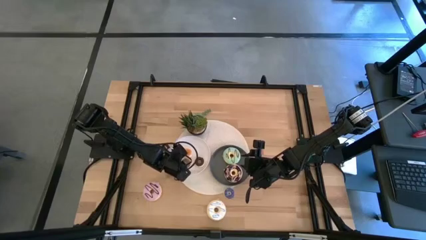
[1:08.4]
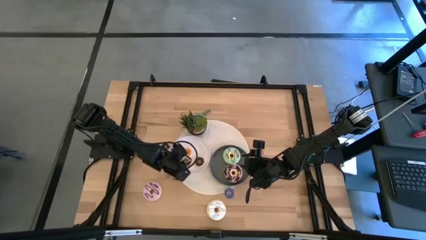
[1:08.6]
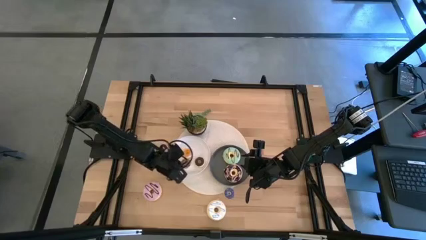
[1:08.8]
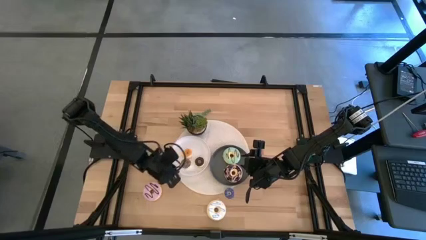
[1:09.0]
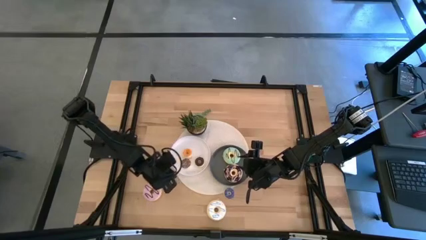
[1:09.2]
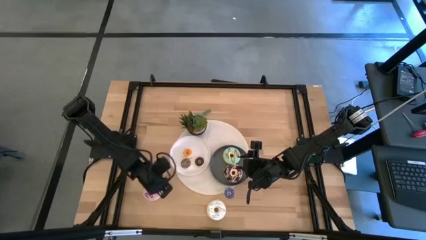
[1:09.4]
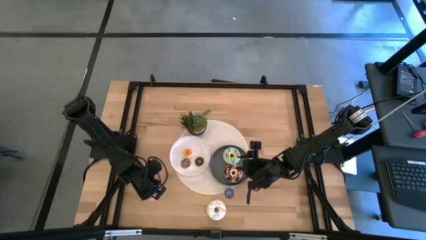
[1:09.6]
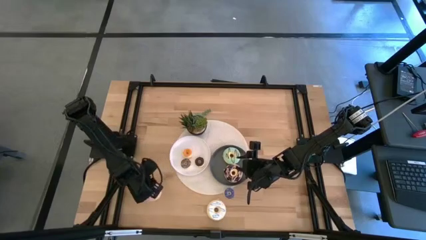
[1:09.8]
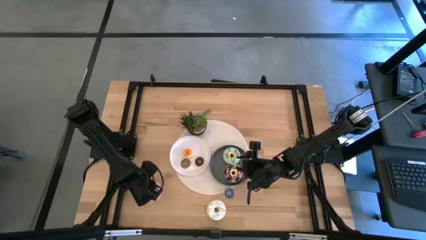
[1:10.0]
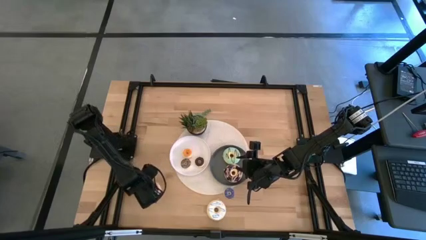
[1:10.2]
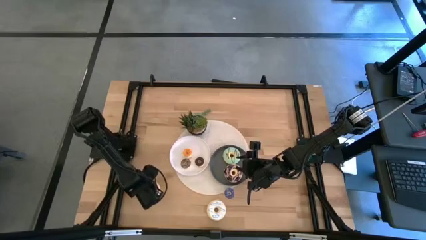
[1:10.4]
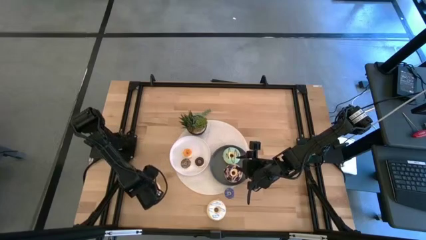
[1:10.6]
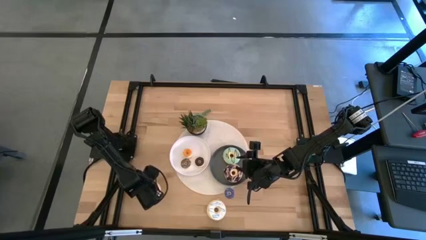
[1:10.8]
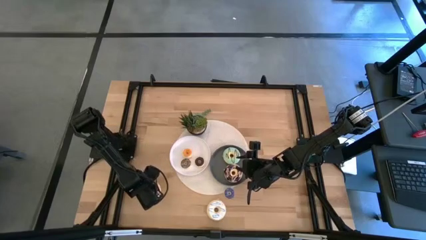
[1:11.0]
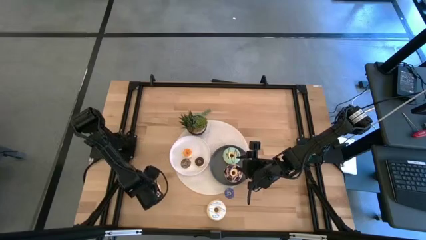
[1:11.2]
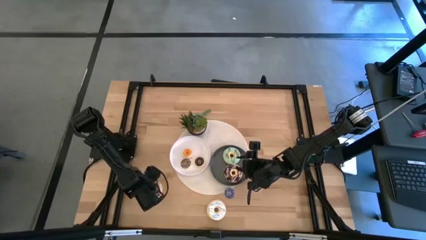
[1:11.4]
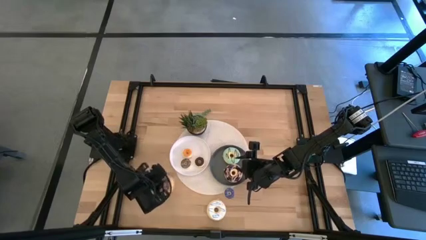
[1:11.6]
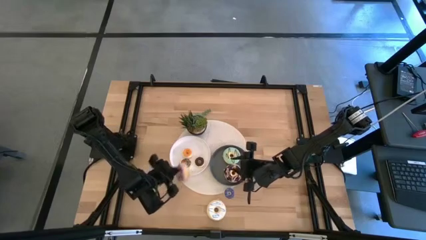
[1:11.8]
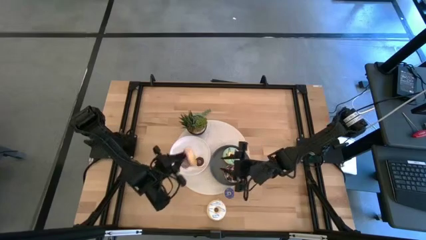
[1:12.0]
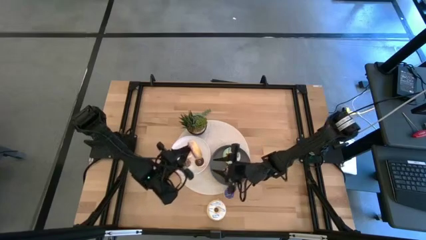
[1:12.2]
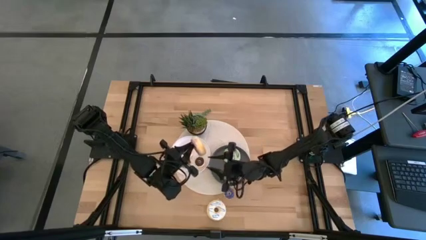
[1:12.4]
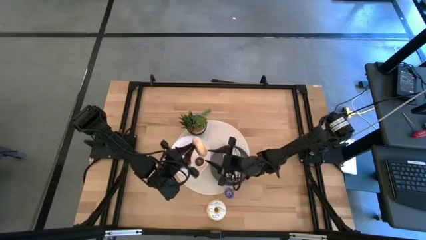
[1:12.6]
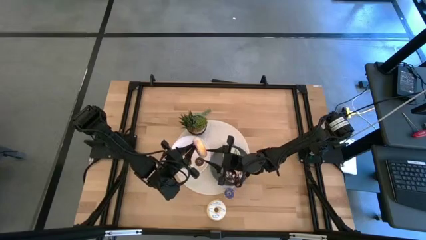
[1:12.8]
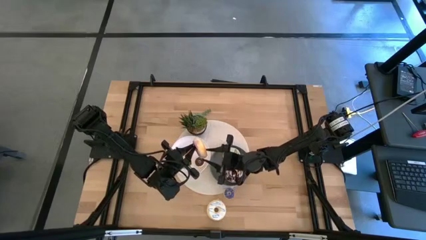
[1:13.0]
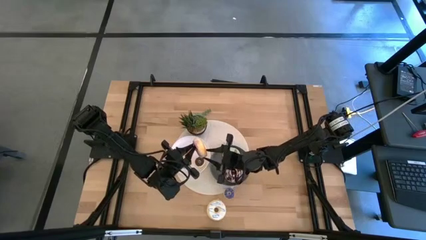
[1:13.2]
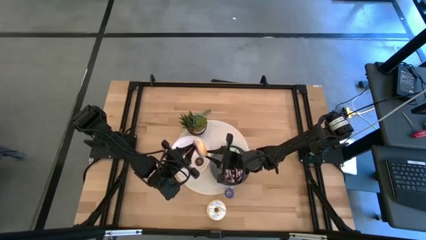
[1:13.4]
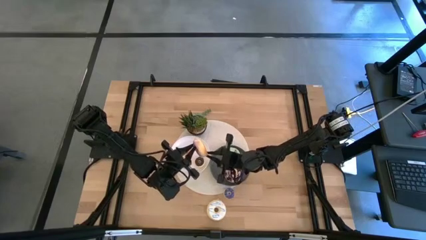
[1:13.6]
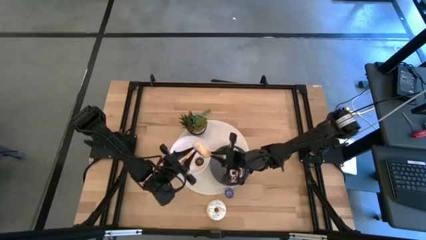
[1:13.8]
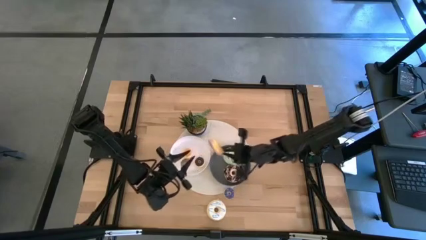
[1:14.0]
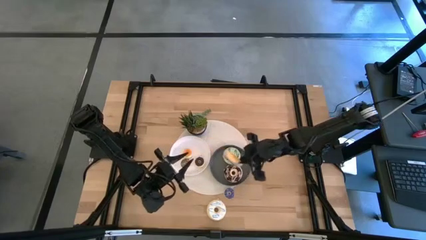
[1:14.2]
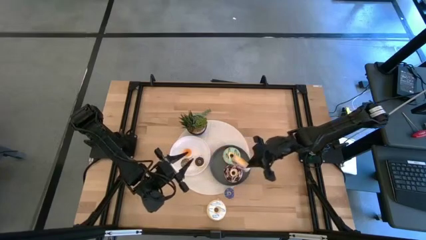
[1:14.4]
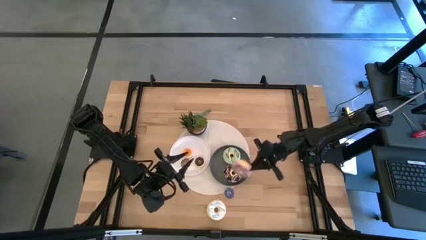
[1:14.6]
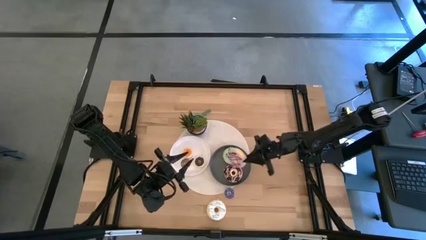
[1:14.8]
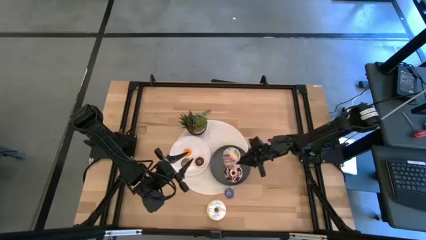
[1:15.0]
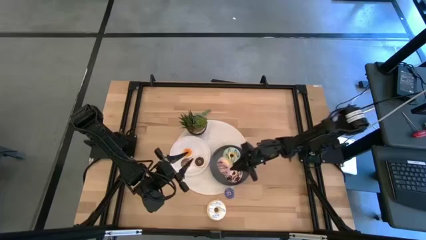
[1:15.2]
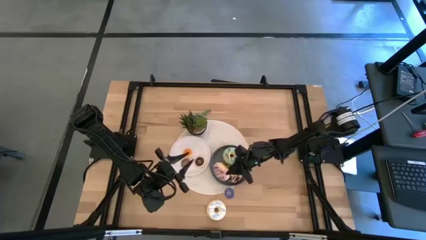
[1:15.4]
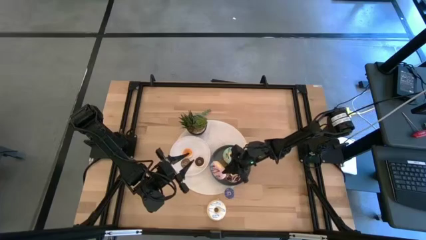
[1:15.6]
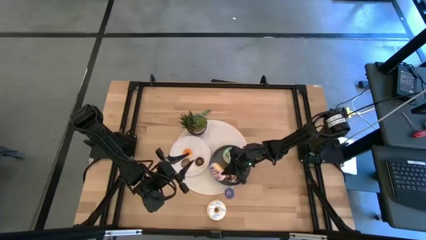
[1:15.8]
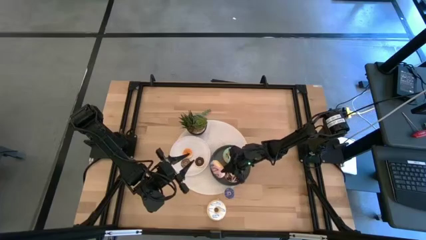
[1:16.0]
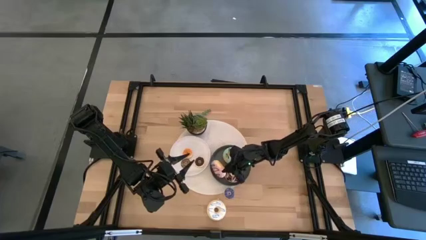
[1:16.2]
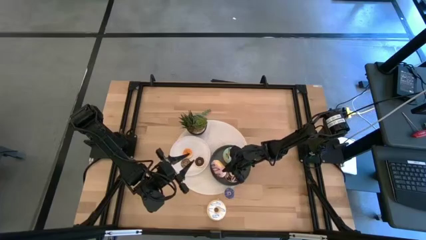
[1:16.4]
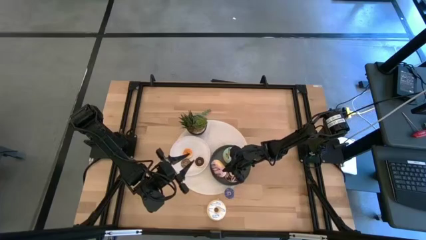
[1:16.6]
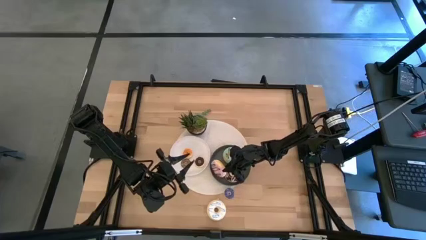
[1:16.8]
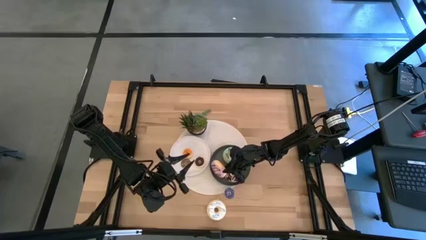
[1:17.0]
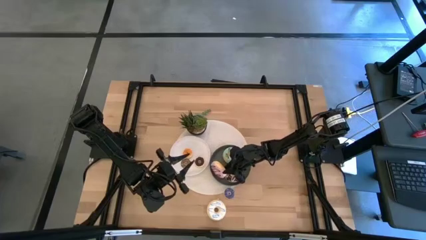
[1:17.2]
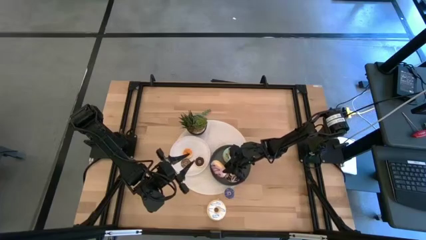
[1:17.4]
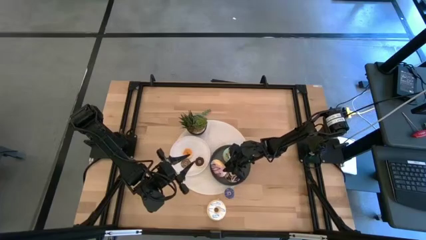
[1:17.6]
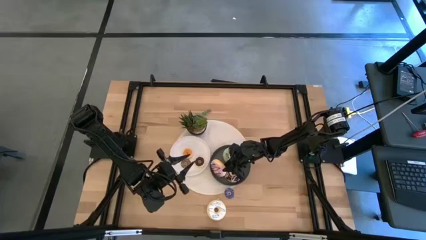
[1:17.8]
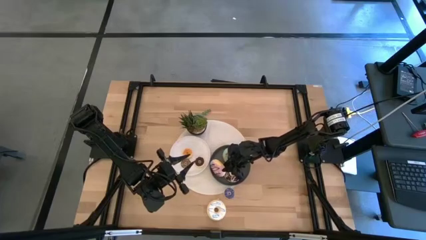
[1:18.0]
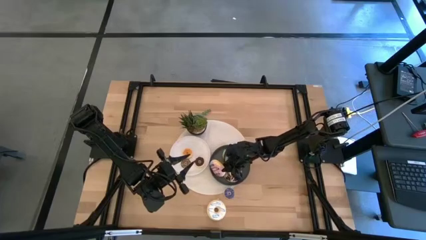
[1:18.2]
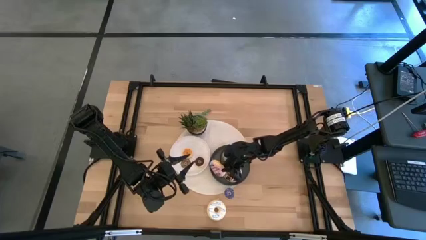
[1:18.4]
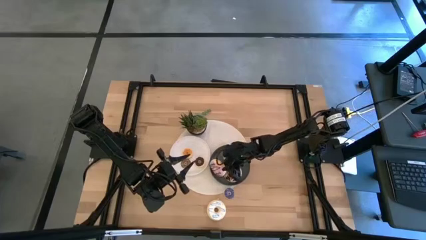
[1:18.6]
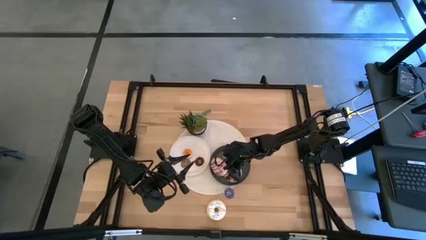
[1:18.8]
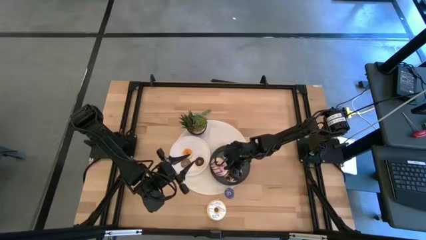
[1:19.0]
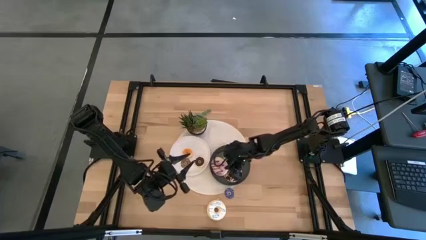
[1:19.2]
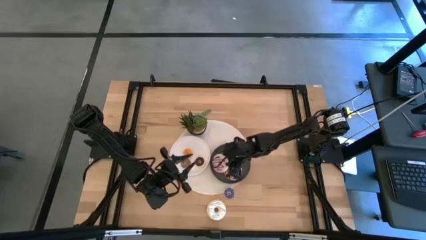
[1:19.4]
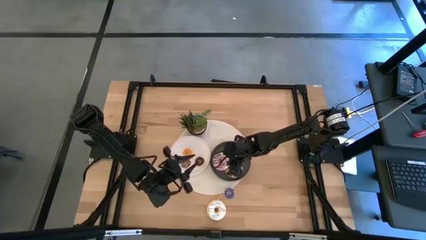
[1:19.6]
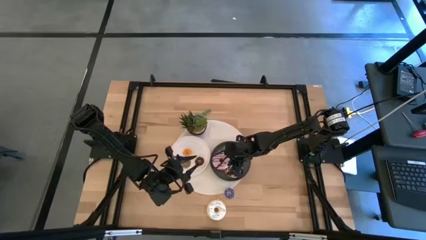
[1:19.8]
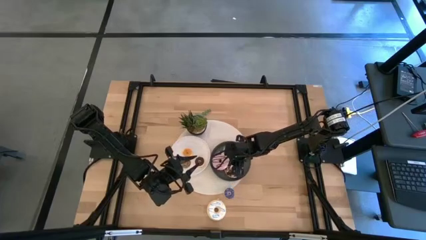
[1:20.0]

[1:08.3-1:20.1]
Task: Pick & Place donuts
Put the large pink donut on the gray plate

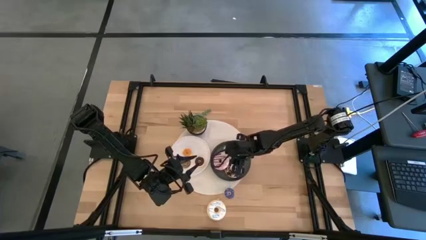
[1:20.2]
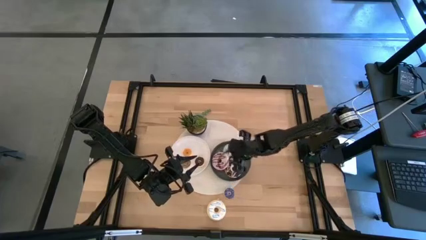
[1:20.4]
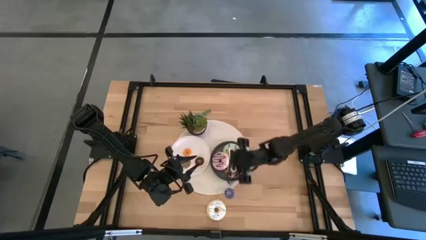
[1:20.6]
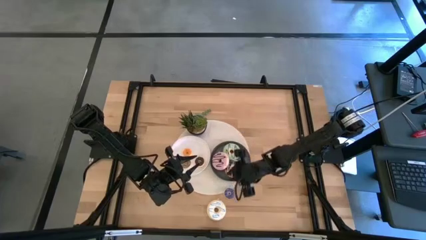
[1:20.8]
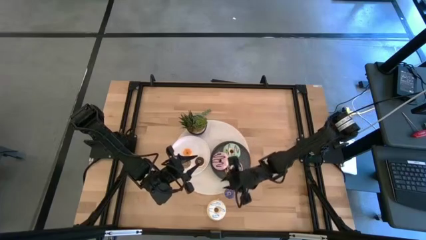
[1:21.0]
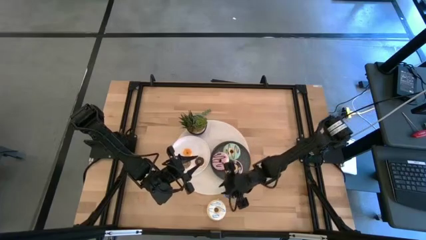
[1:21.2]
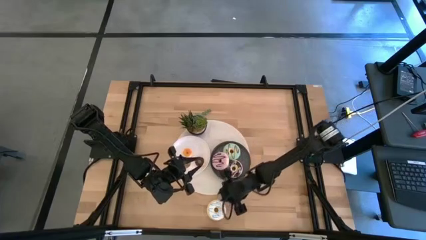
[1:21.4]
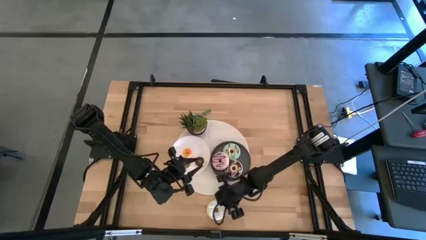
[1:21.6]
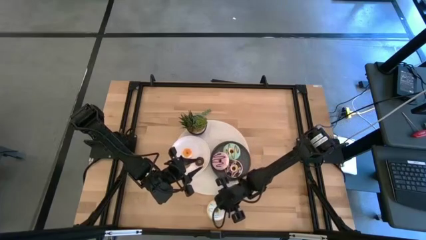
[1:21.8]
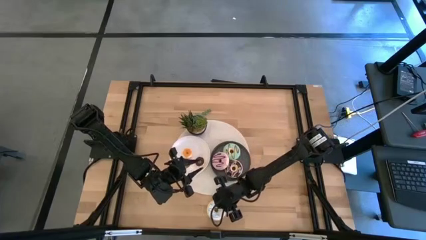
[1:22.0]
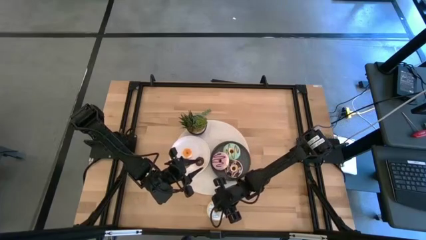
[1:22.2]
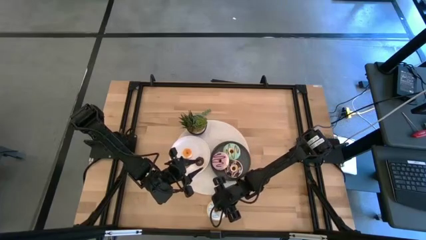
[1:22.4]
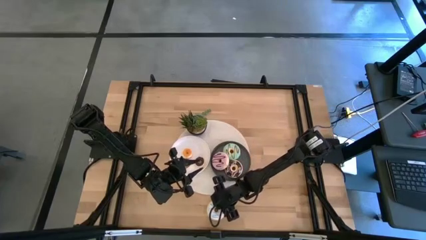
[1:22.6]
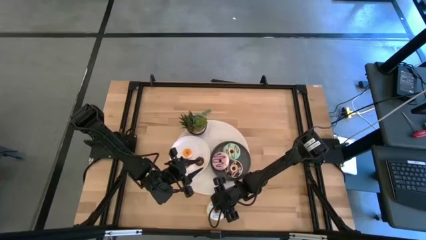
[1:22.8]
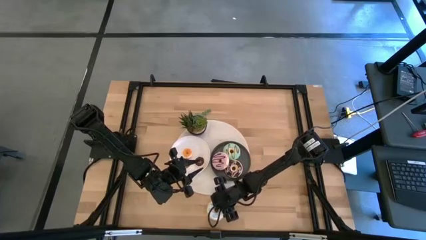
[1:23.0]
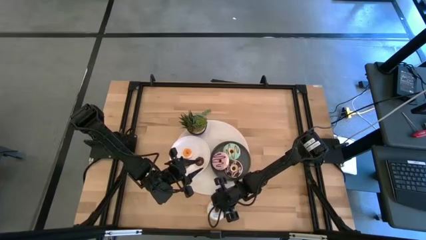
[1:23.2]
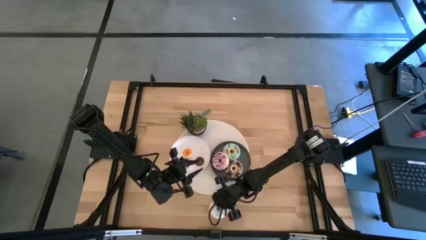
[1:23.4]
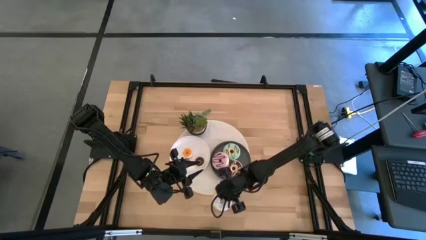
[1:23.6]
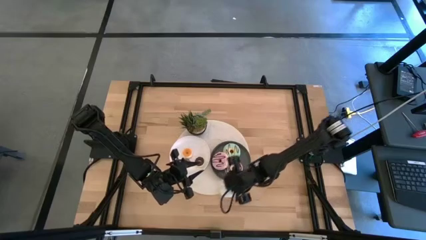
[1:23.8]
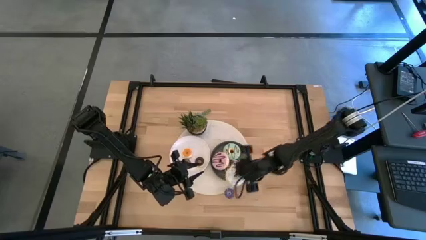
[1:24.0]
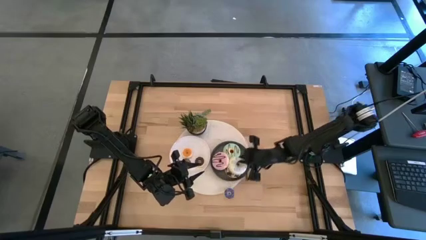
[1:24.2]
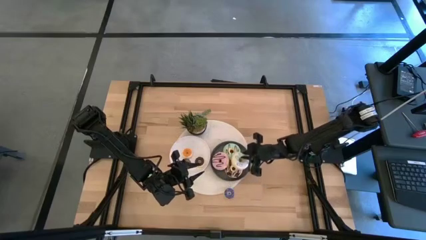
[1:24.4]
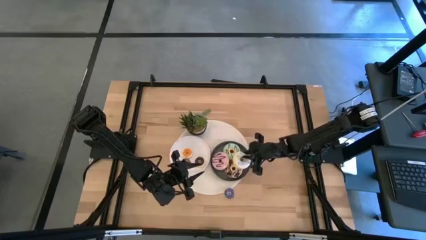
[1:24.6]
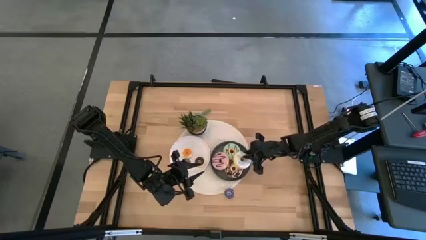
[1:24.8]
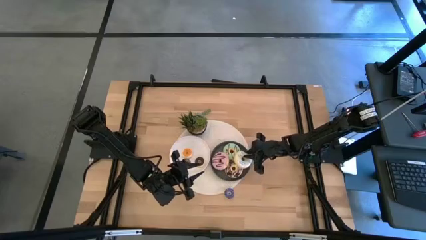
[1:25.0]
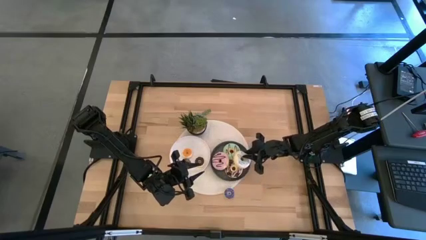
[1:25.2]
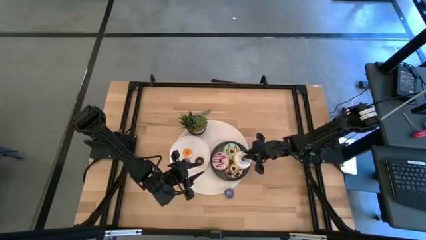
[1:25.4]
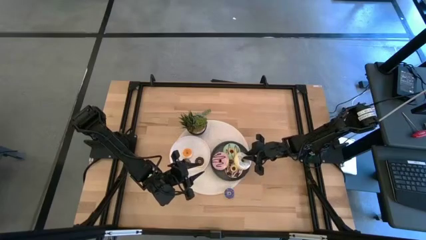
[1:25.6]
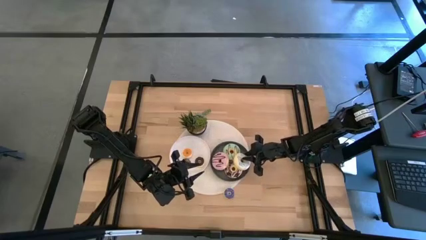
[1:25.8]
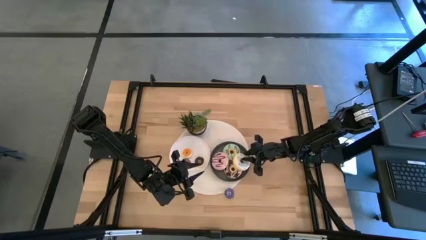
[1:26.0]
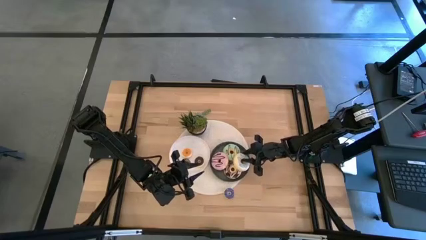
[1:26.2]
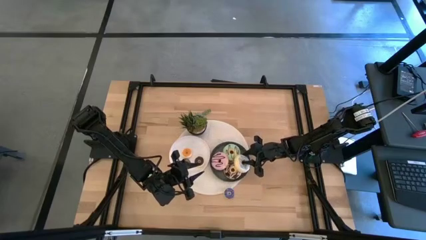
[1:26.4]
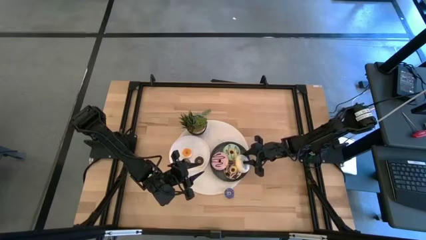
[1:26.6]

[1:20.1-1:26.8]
Put the large white donut on the gray plate
